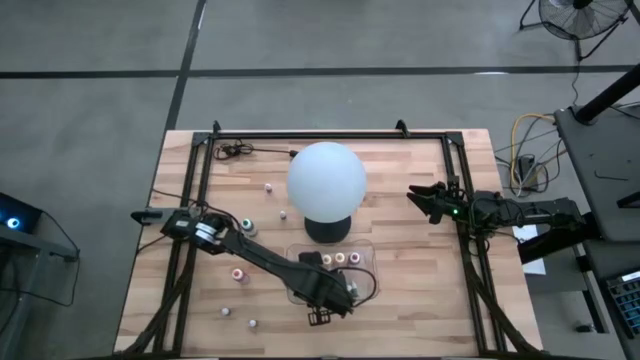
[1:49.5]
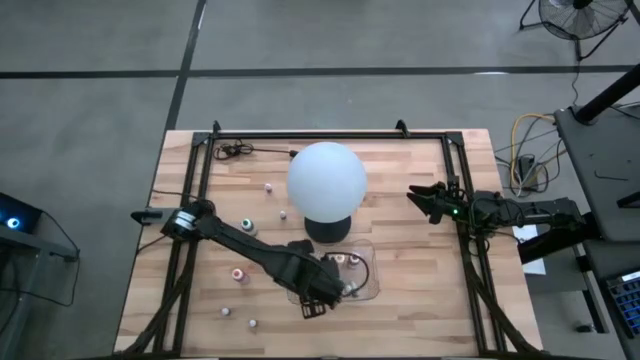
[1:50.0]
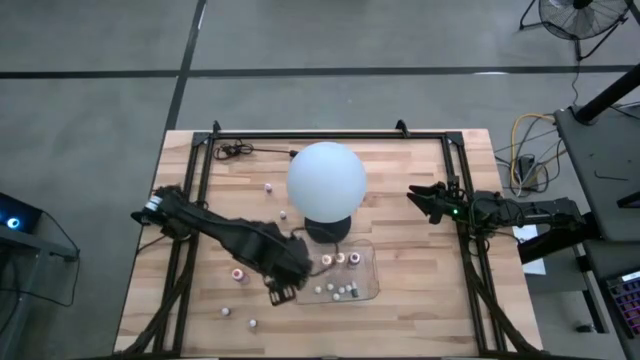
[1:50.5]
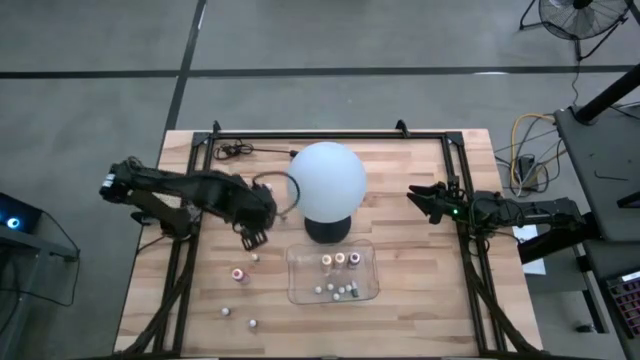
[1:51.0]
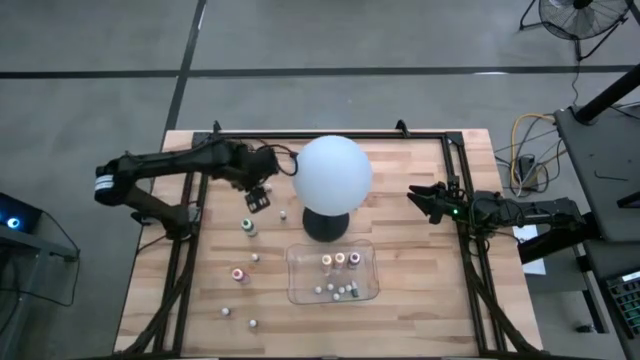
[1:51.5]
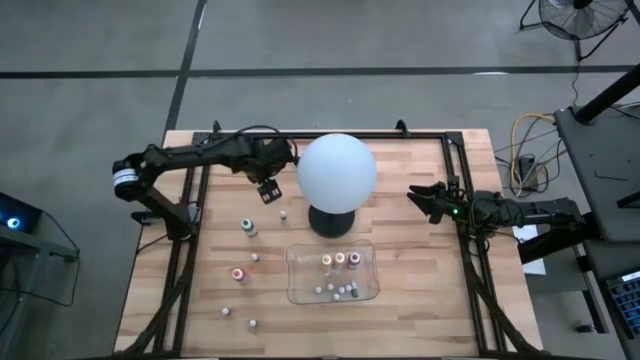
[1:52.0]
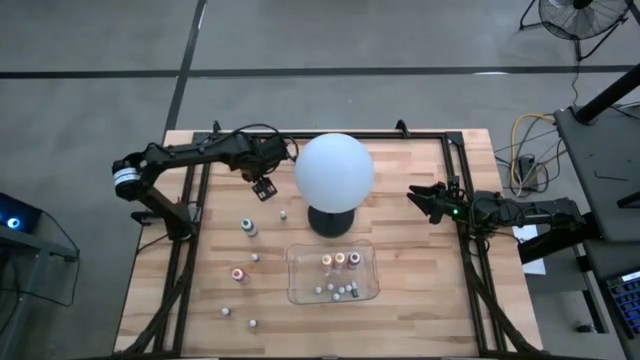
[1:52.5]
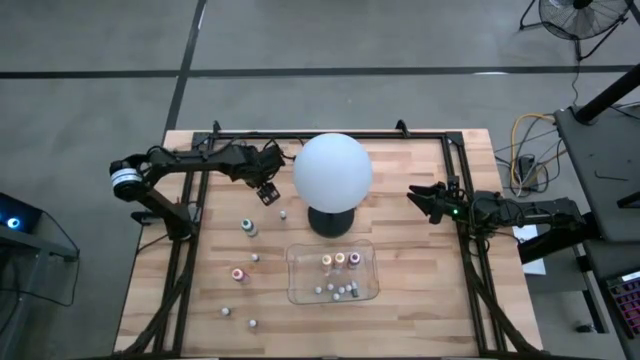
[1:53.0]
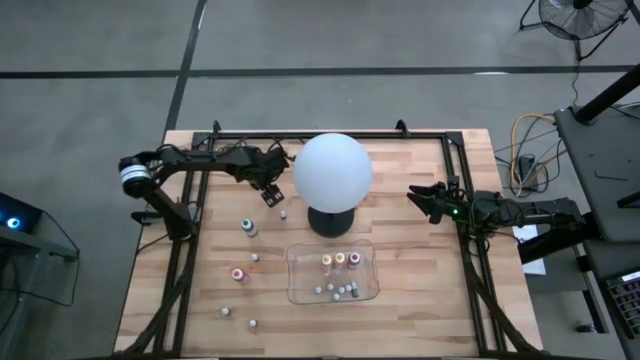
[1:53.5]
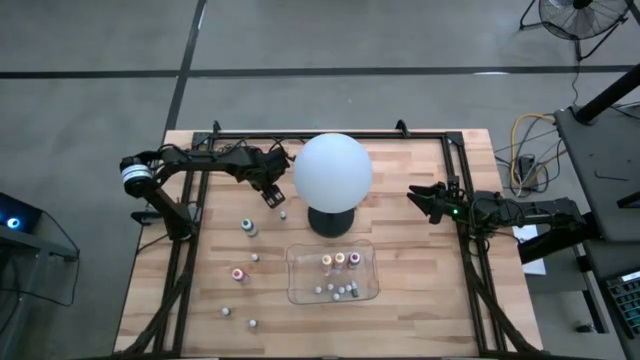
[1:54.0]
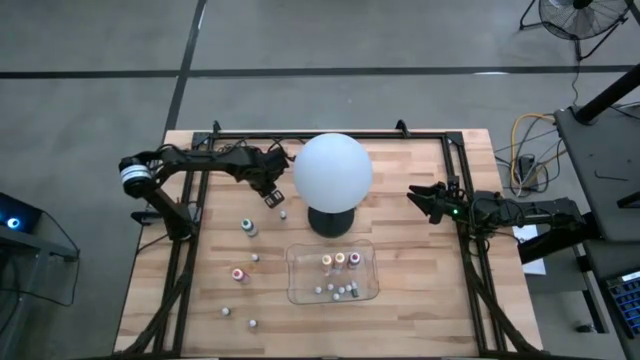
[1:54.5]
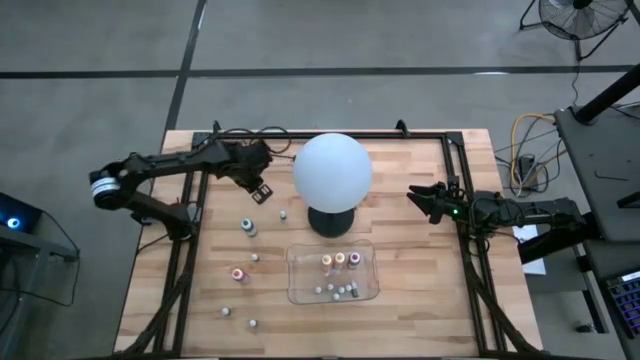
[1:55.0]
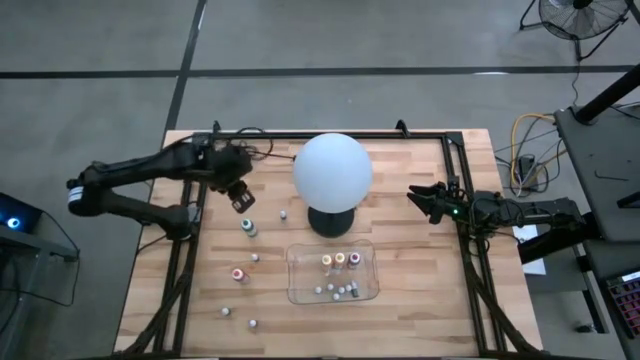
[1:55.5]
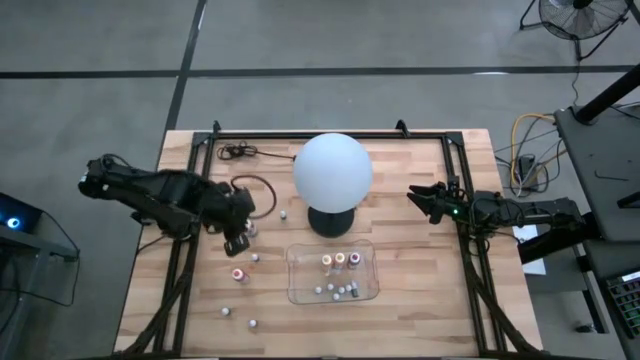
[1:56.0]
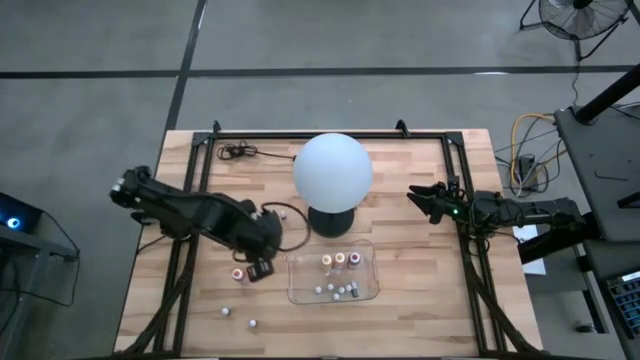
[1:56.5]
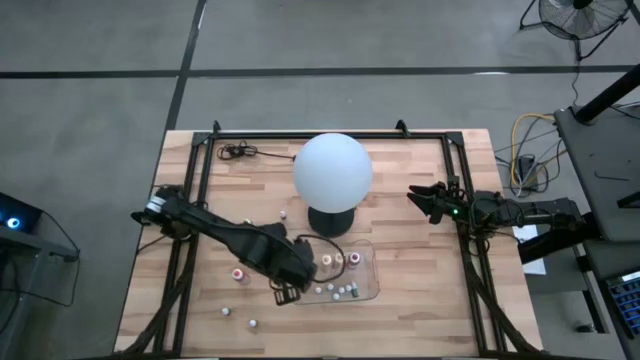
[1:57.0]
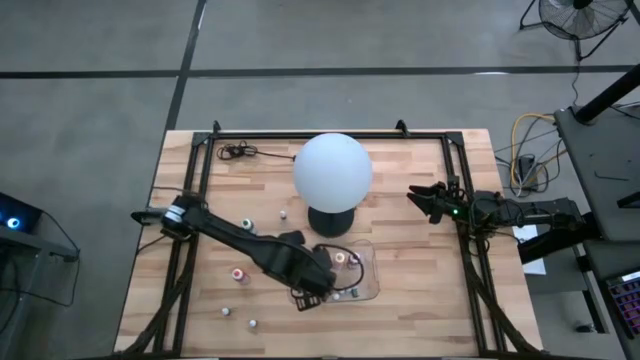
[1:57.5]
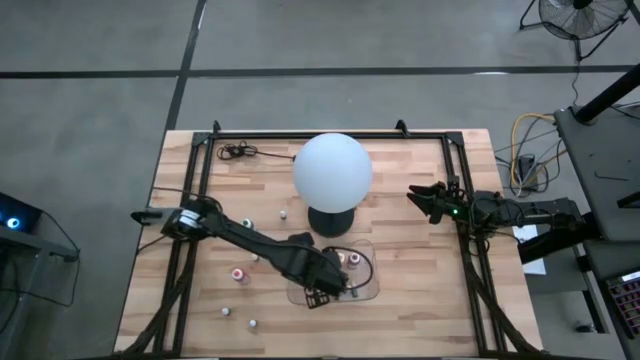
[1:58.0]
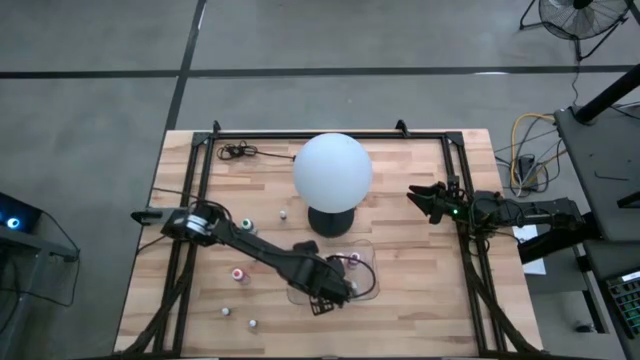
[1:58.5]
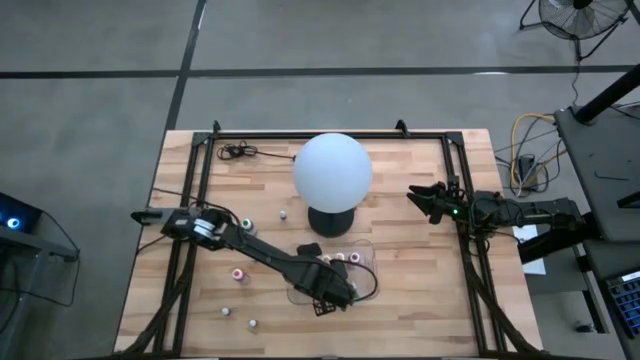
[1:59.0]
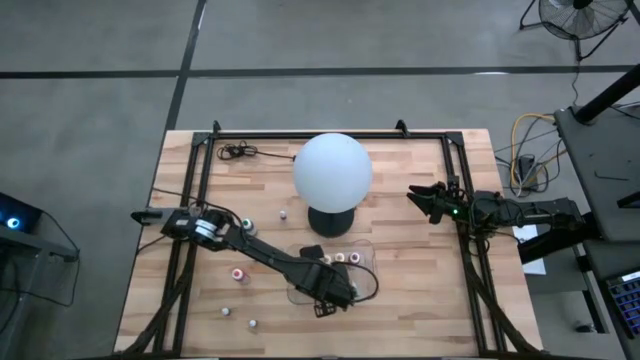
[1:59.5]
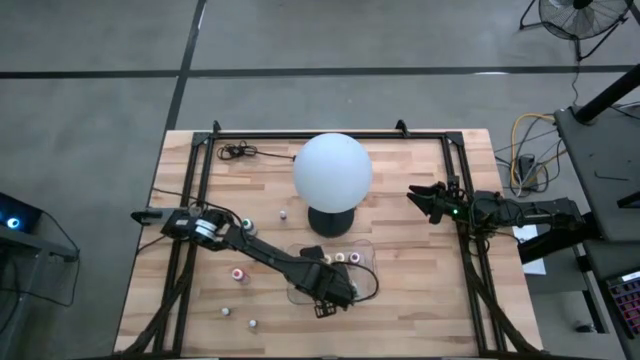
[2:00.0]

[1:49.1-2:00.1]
Task: Pick & Place food coloring
Put the top small pink food coloring bottle into the transparent bin

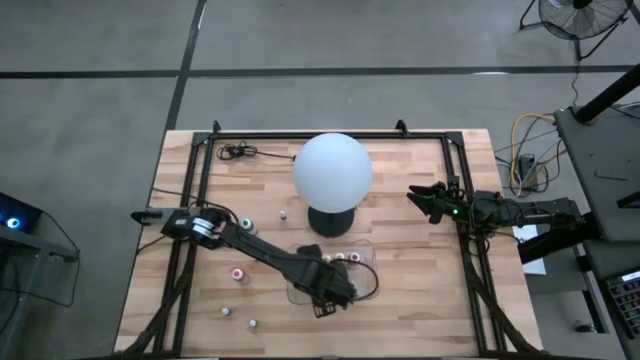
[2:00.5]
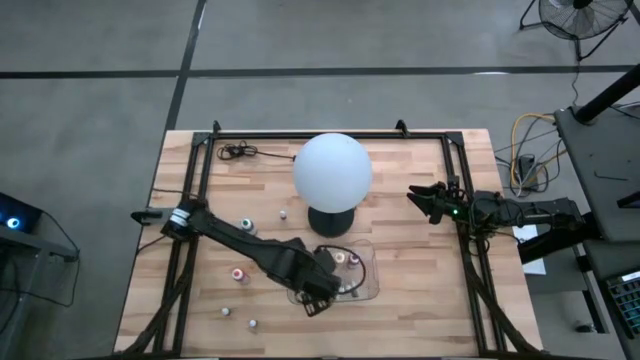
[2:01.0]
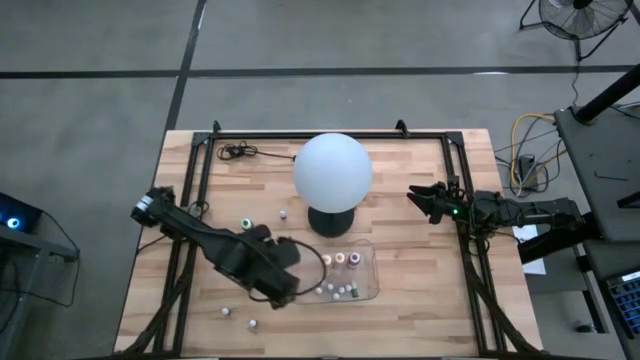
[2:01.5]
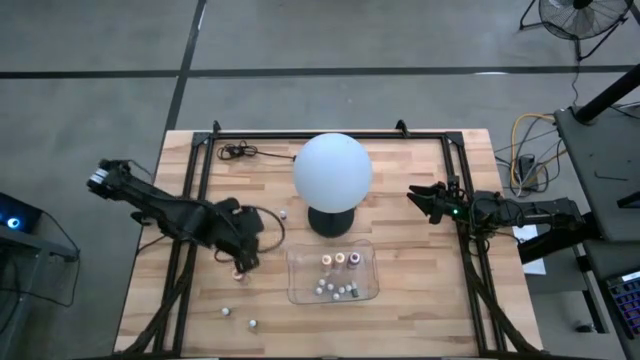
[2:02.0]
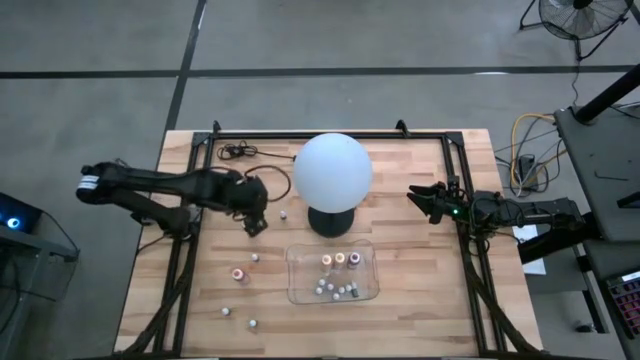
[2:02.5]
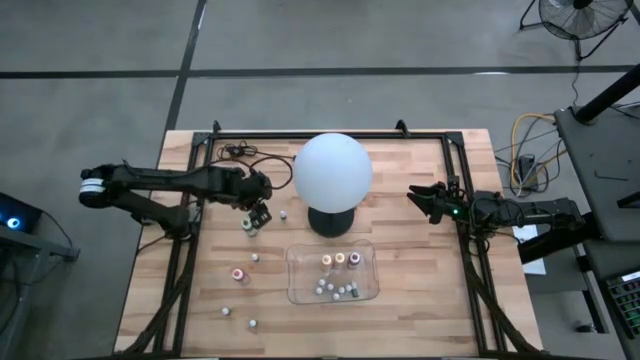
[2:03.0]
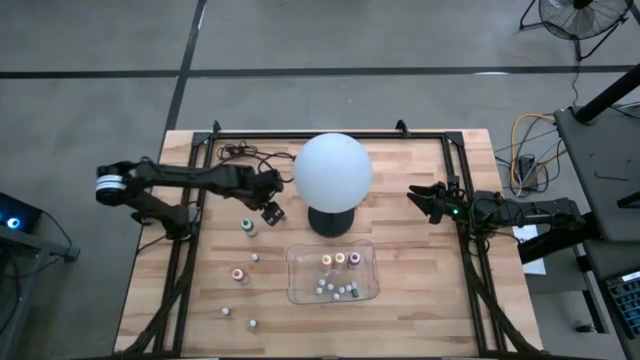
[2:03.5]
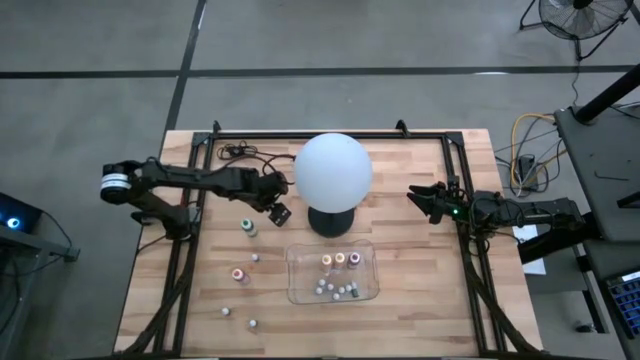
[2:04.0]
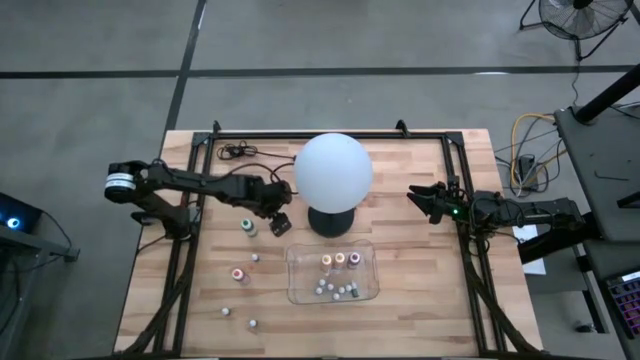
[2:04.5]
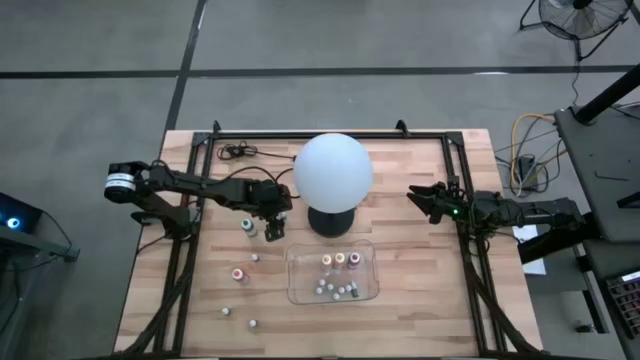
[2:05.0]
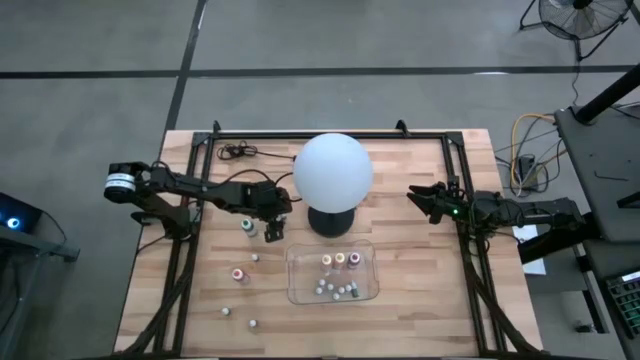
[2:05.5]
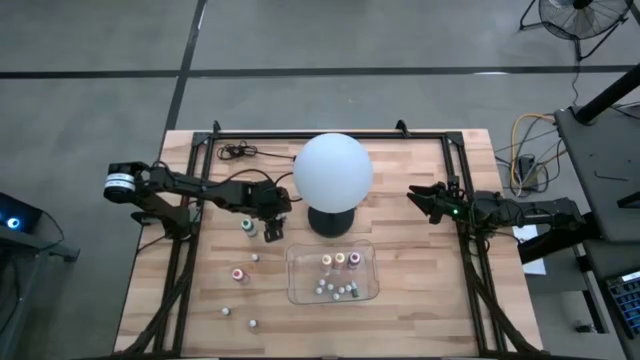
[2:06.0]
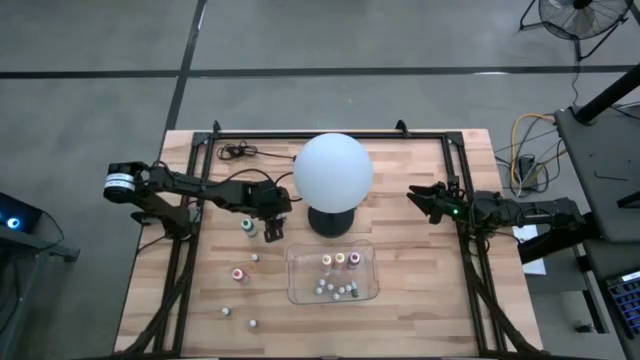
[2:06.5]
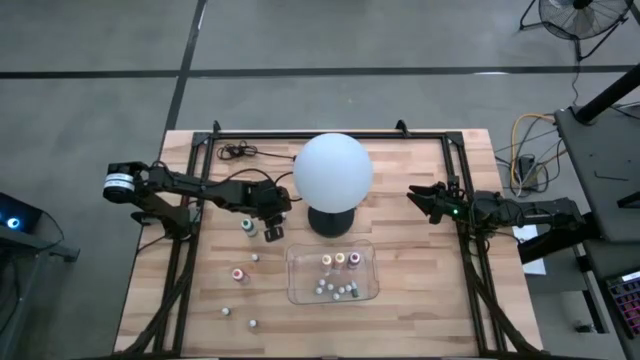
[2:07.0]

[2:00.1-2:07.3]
Put the small pink food coloring bottle into the transparent bin
